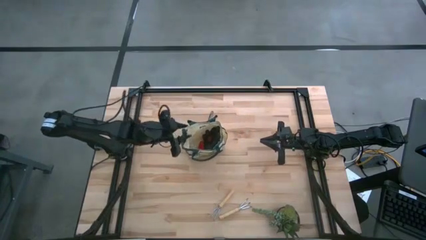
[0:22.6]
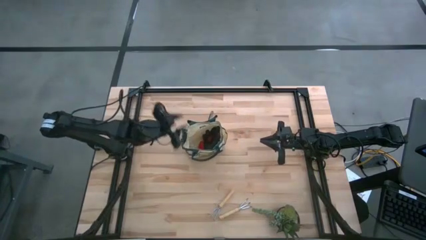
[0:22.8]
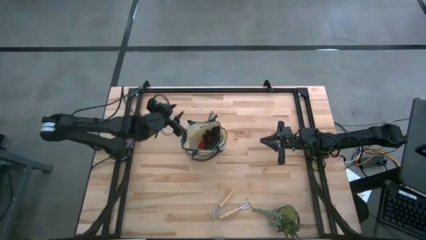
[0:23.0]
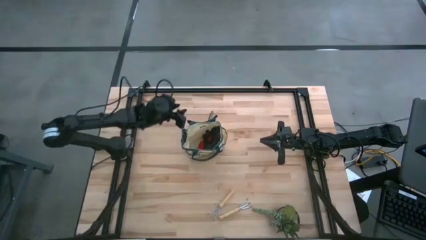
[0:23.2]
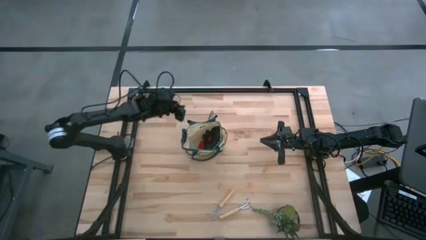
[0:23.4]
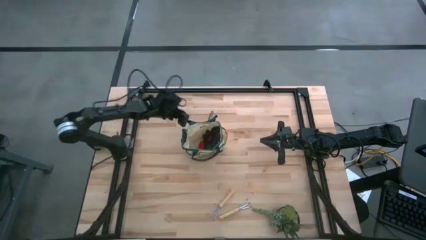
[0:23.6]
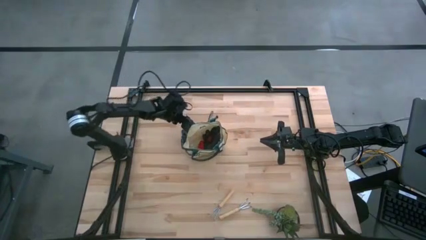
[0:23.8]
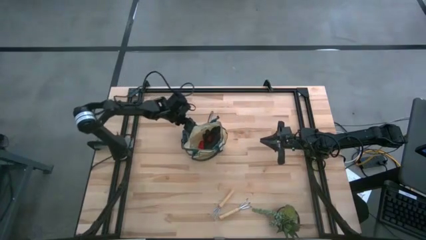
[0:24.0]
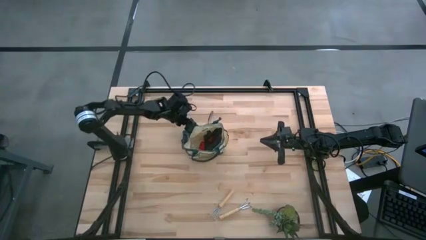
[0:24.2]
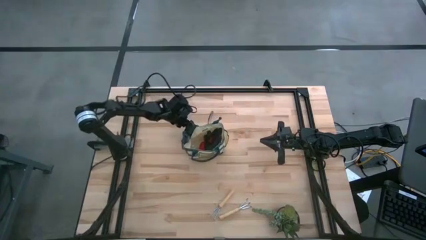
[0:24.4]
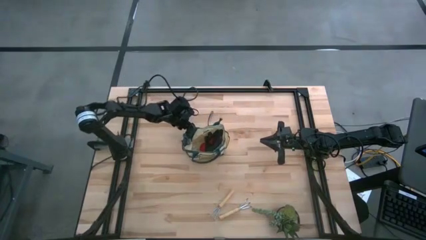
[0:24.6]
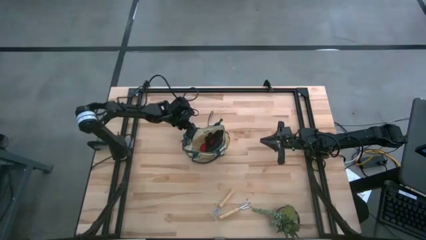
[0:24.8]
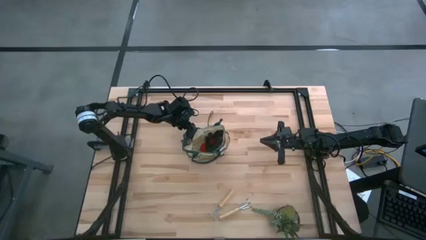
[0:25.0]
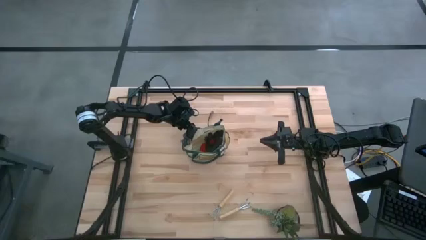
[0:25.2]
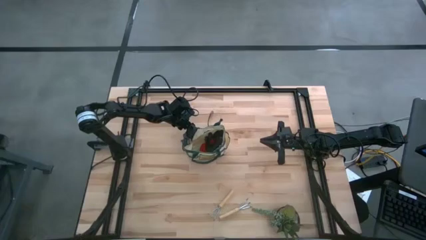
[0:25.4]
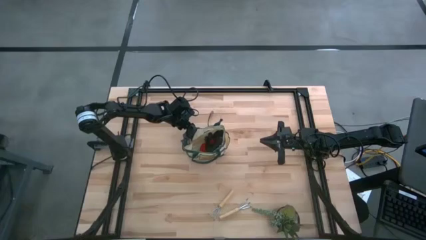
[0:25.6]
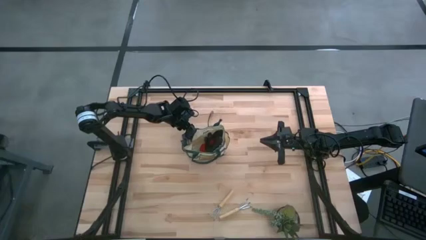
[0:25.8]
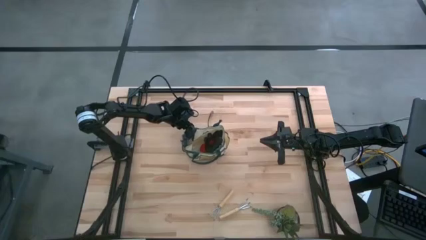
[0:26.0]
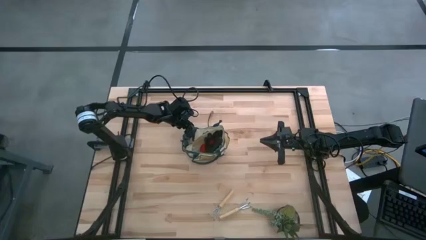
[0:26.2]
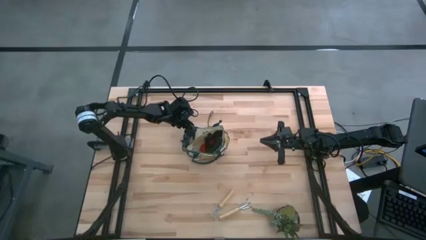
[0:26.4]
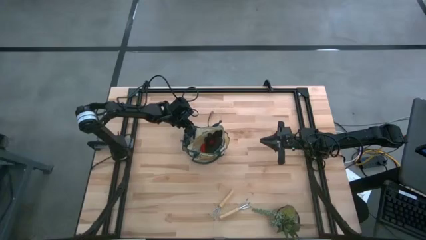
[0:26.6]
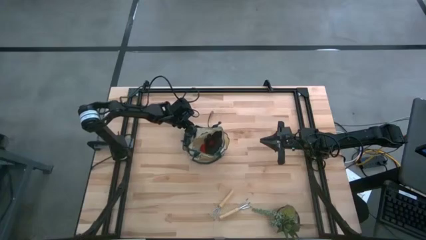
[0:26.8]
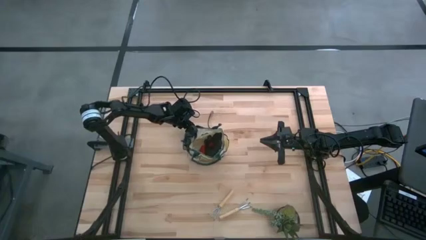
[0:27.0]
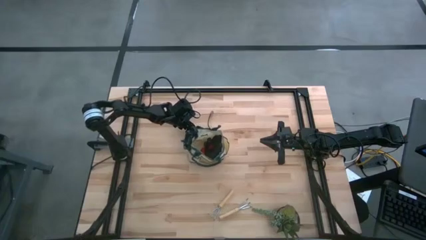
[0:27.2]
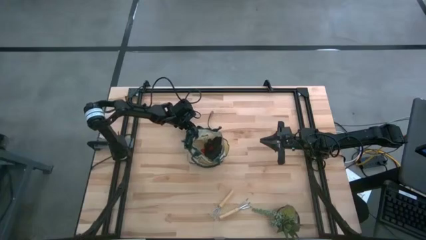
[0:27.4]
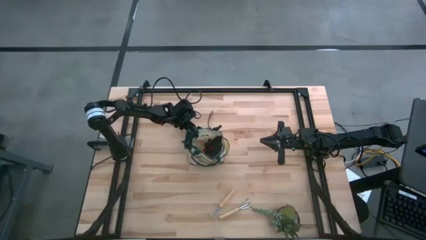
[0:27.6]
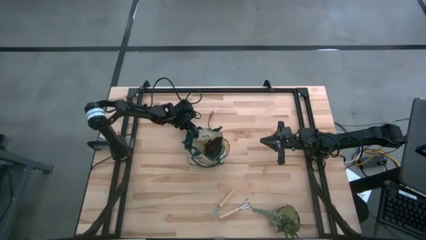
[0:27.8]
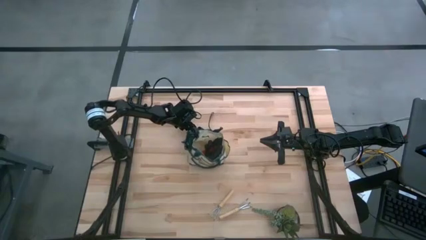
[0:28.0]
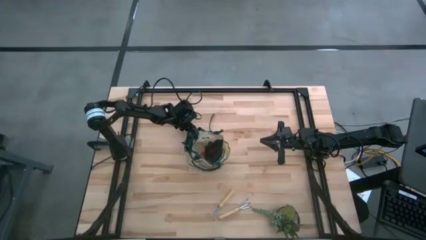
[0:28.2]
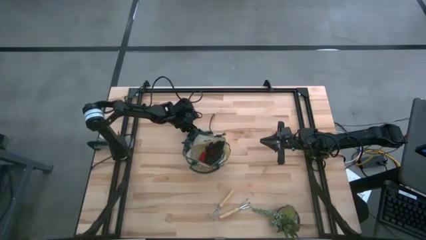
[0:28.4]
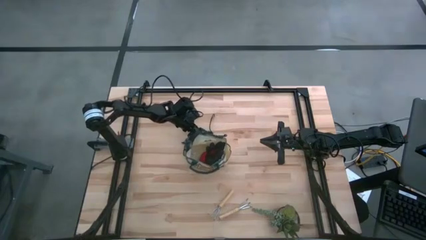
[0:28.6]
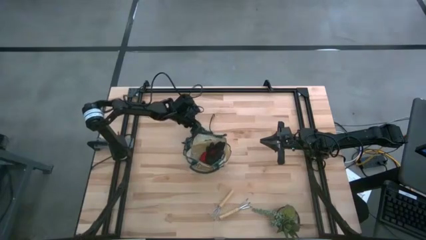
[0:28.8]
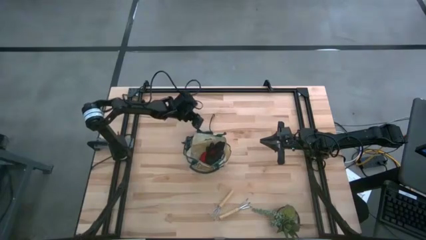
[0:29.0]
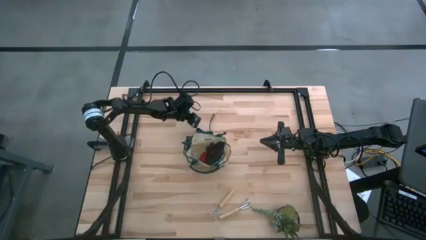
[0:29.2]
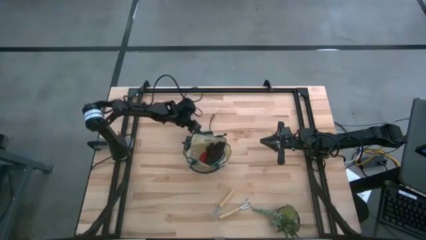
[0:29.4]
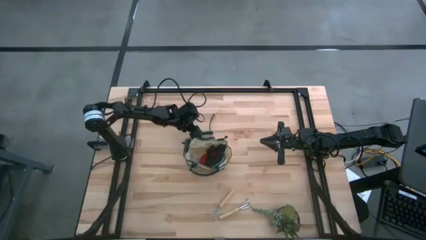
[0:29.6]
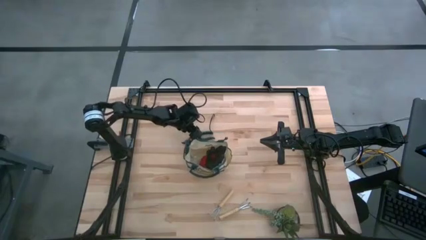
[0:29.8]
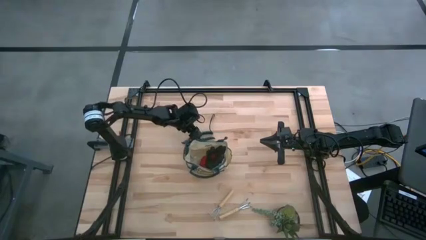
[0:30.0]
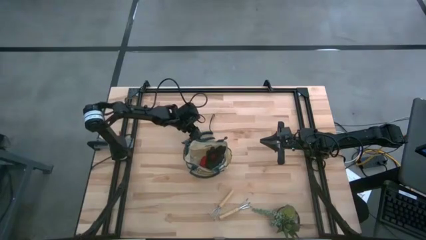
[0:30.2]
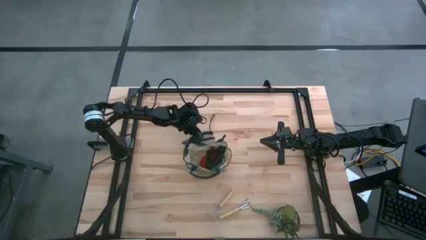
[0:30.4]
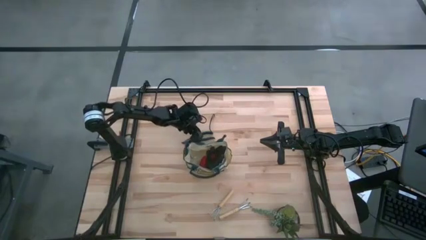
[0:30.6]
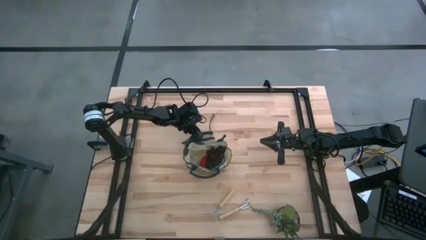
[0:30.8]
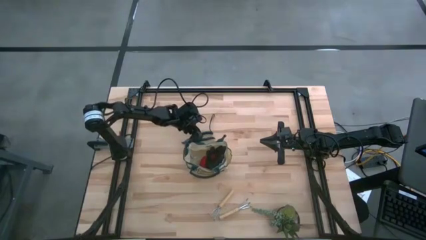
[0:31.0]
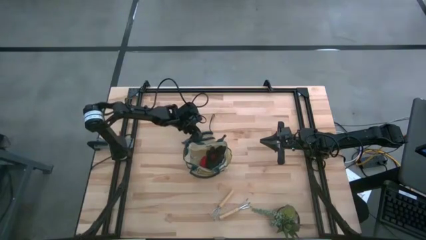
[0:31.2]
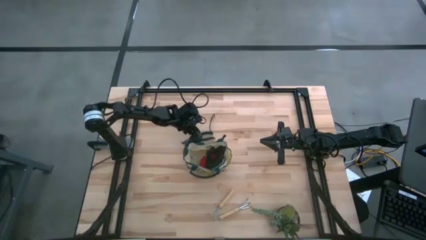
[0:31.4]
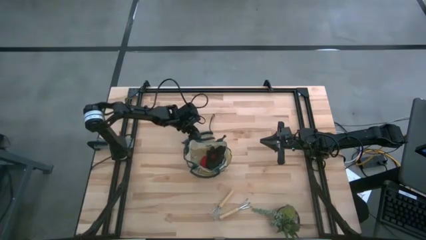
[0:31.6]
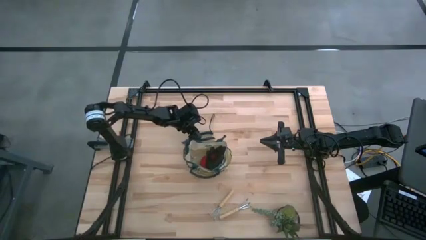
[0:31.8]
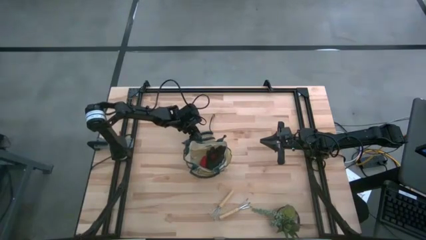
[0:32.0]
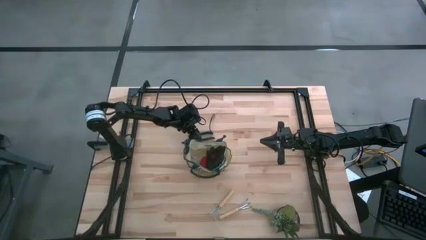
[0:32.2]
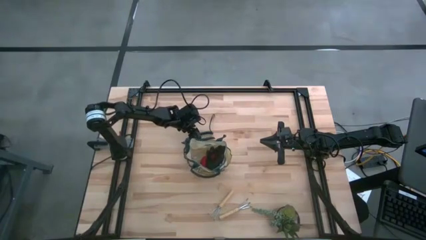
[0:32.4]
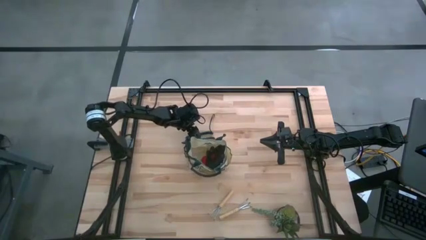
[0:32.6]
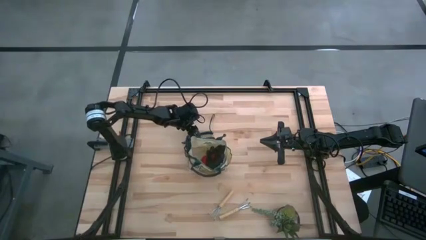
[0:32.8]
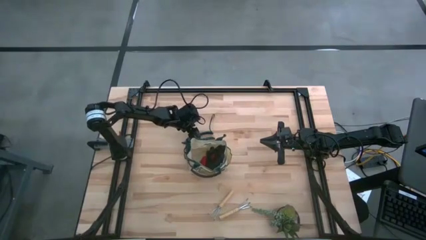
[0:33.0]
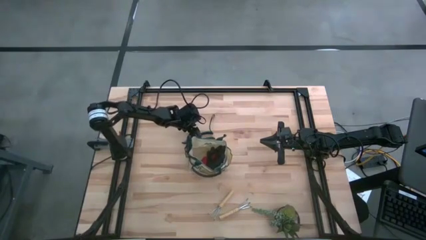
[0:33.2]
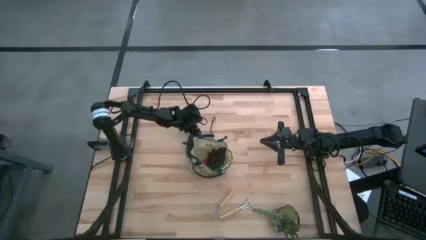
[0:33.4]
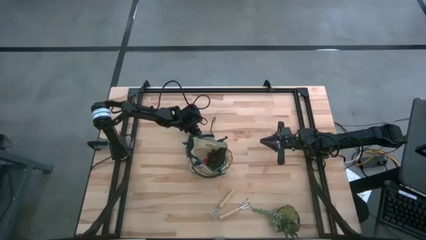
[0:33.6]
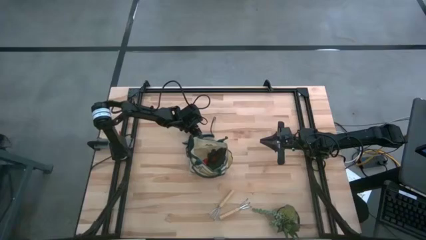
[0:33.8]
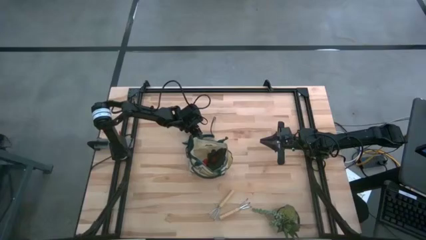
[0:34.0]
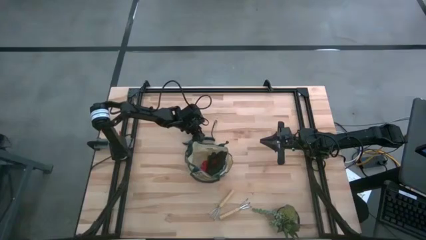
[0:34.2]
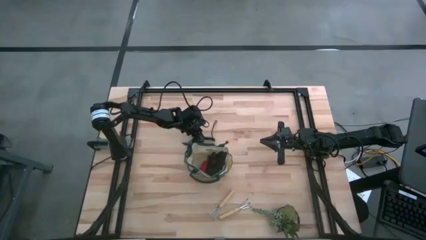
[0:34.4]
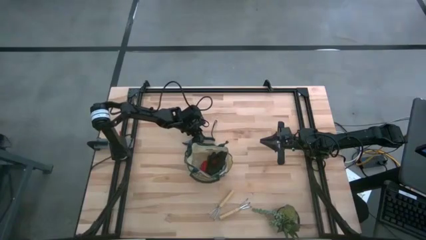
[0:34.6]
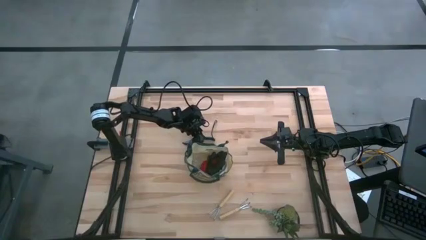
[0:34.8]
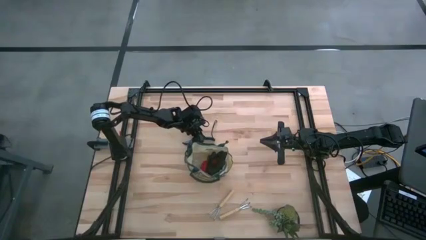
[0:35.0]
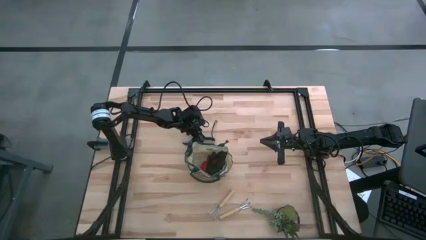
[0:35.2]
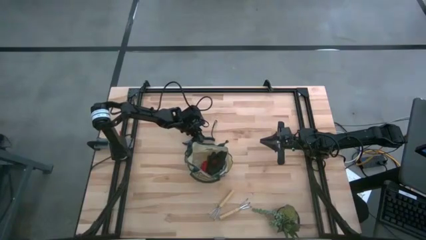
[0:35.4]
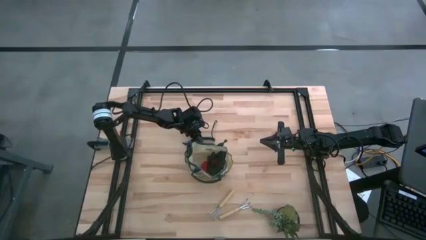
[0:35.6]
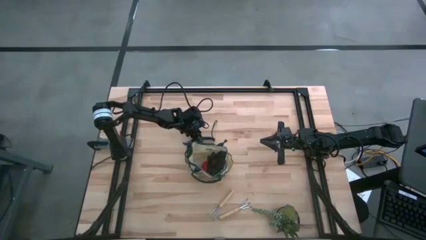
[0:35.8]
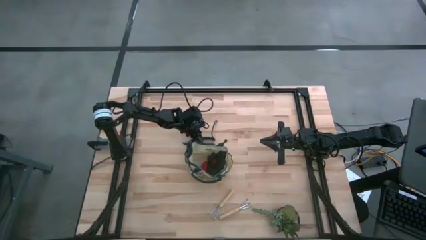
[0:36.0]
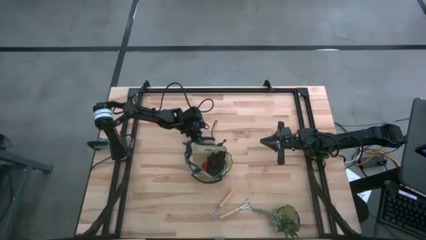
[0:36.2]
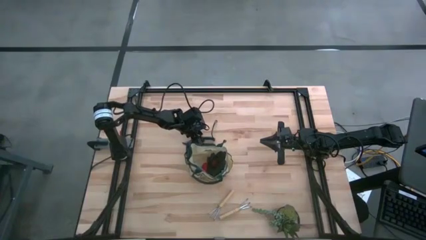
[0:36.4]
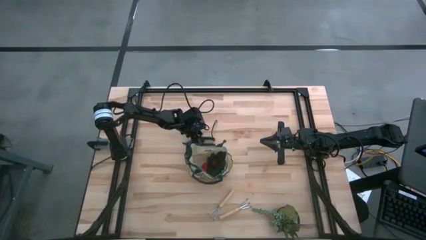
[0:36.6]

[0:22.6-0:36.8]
Task: Pick & Place Garden tools in Gardening bag
Put the green shear scissors into the gardening bag
